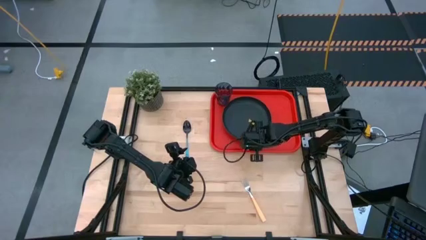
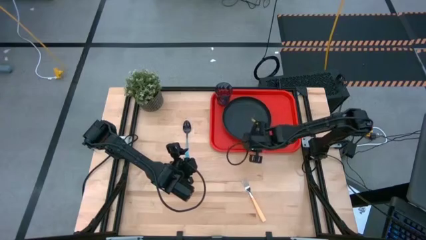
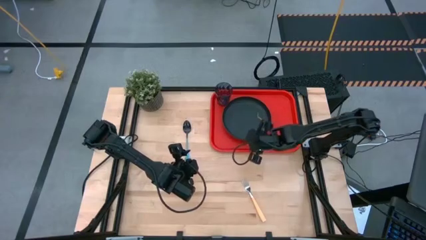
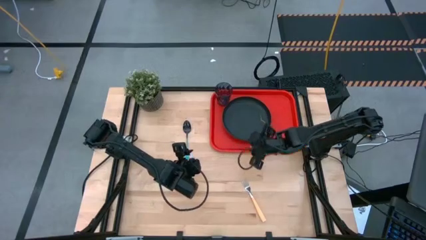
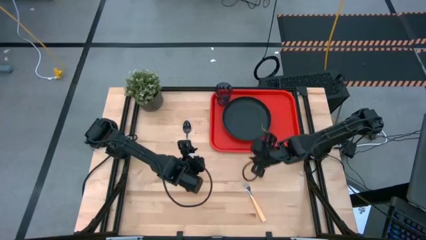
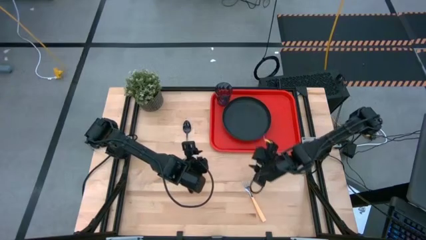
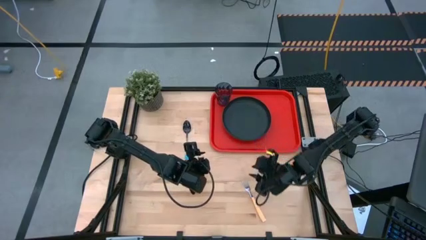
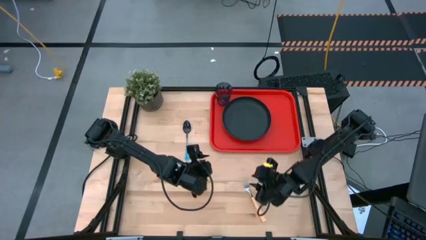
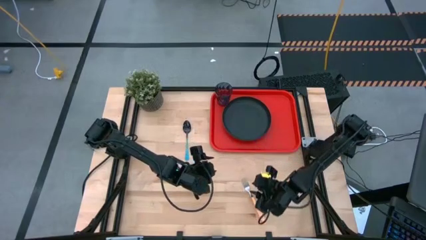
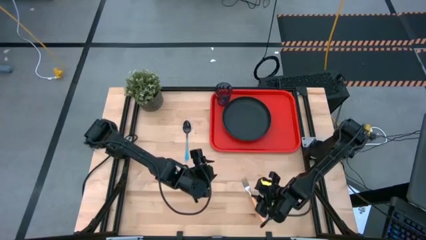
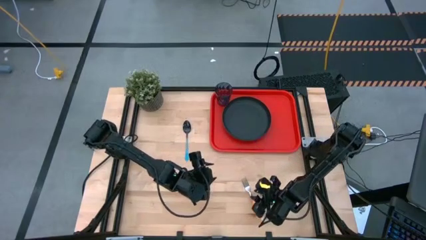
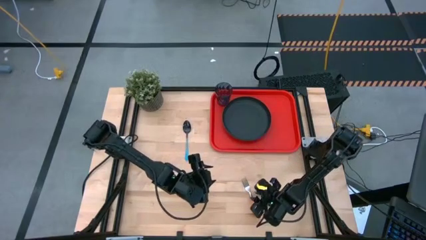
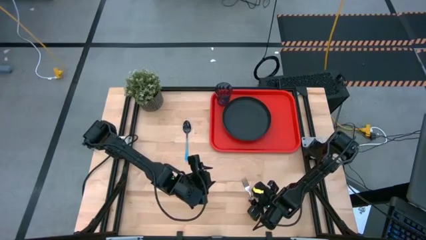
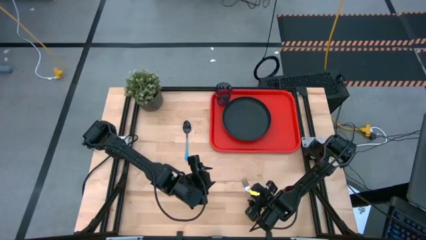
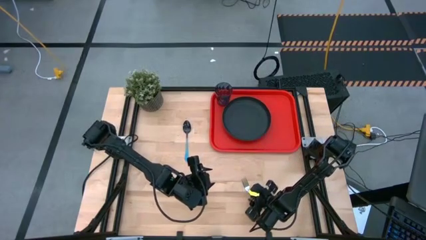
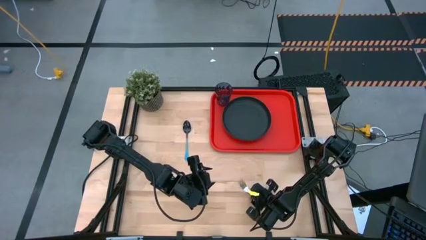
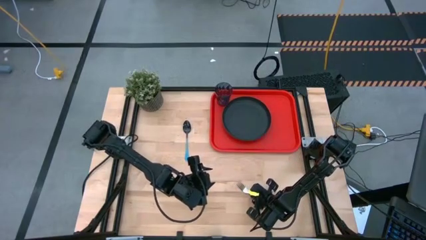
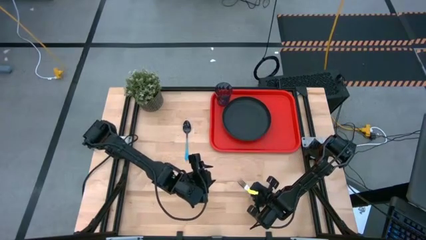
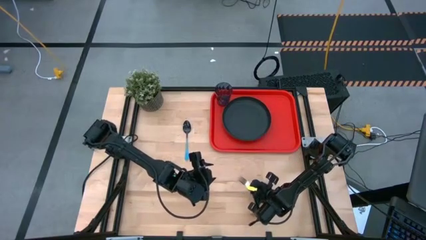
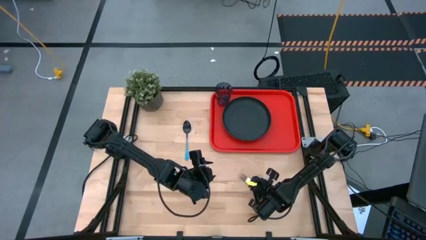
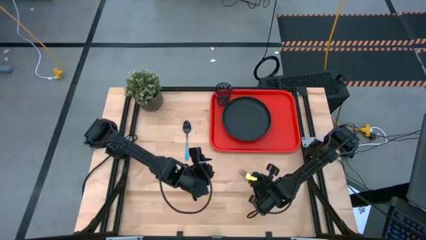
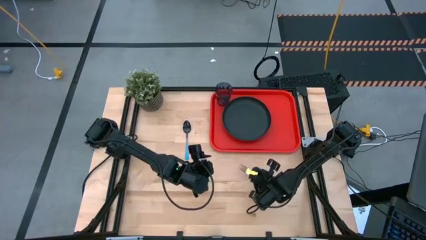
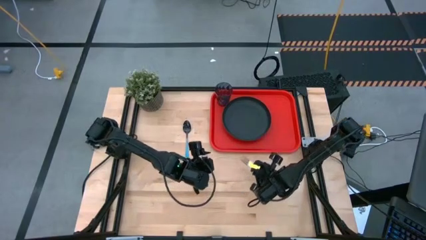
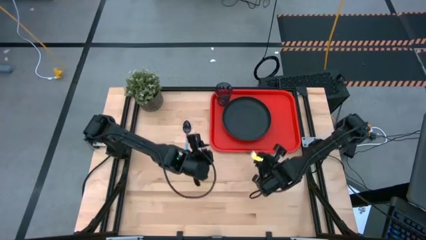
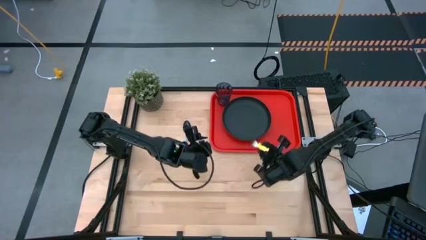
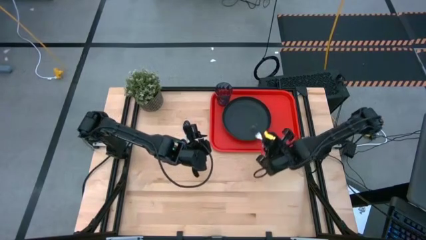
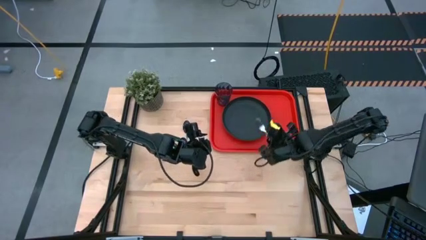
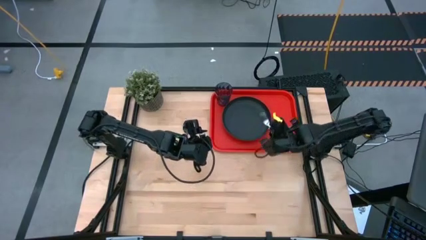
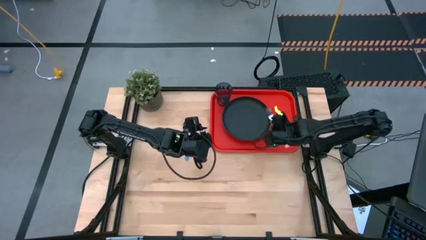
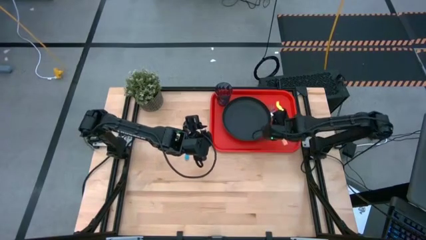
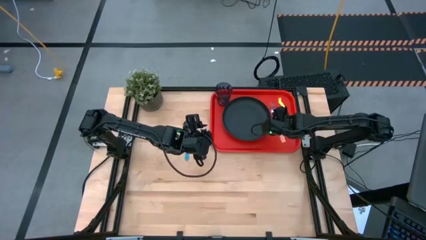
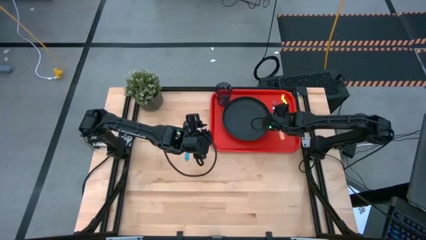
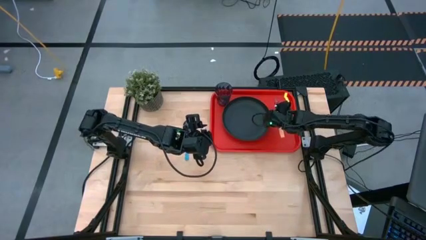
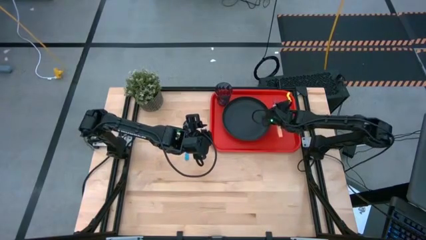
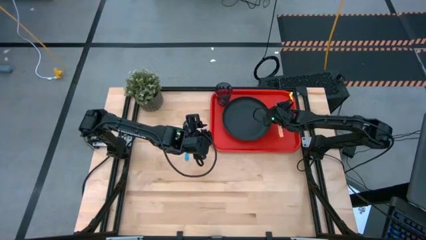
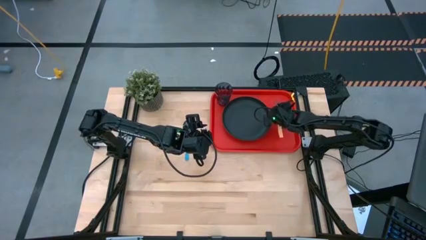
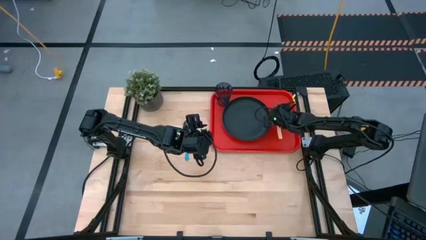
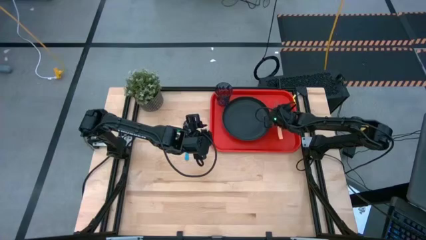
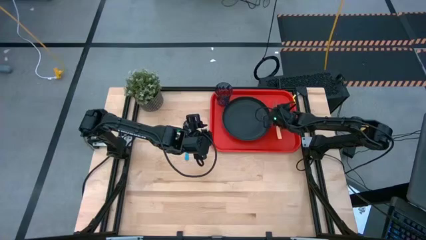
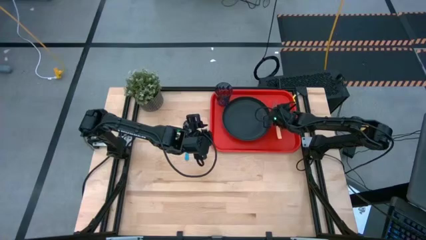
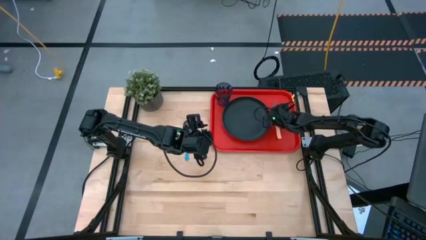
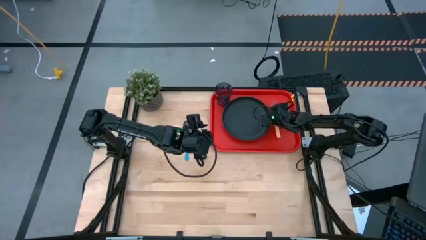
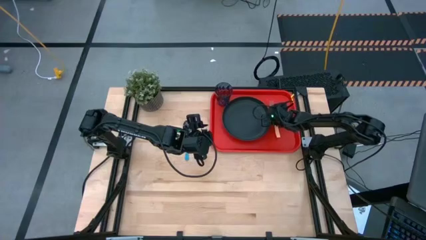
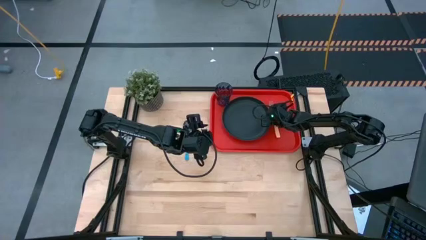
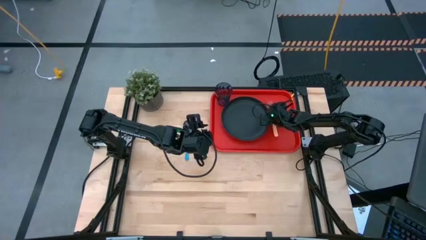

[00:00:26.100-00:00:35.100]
Task: Pick and place plate/cup/fork/spoon on tray
Put the yellow fork on the serving tray to he right of the black plate

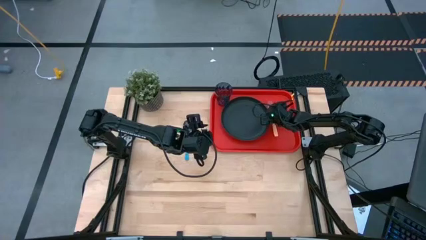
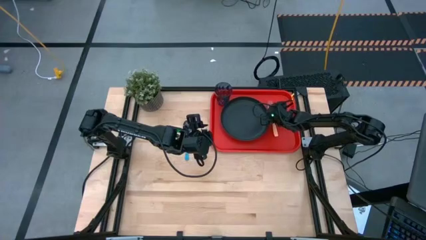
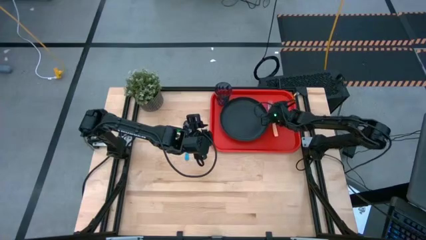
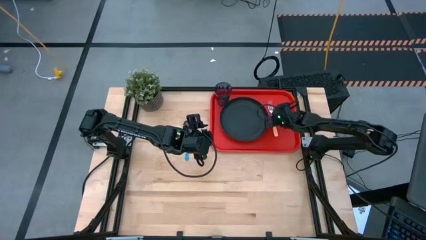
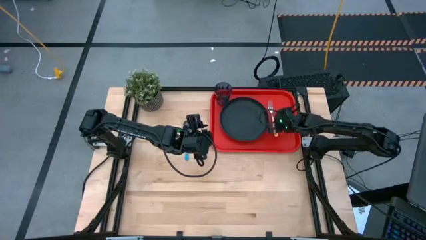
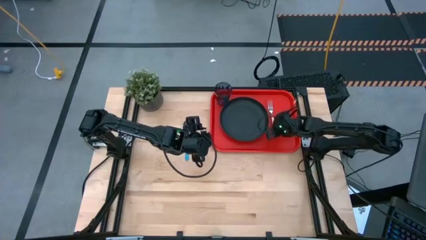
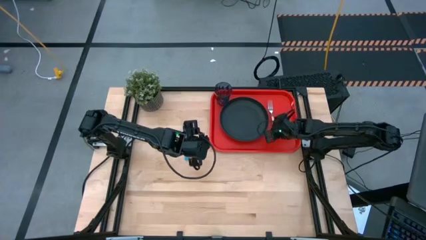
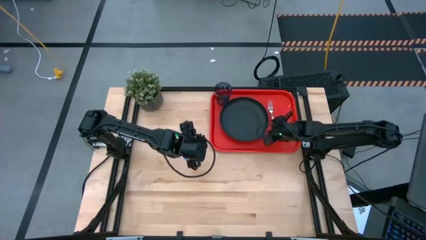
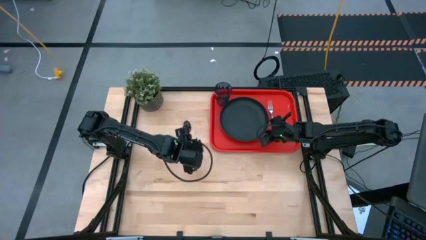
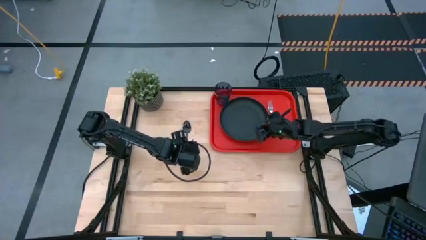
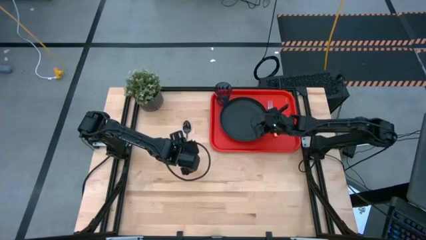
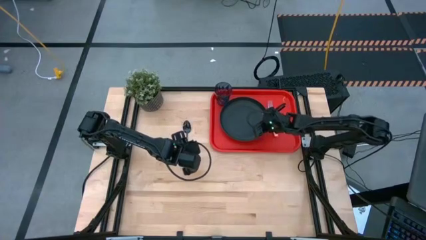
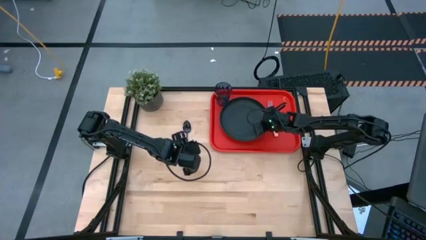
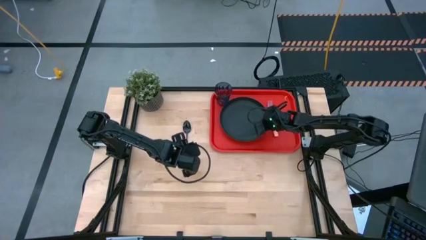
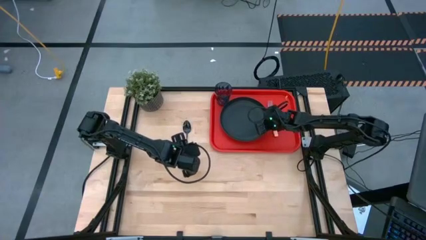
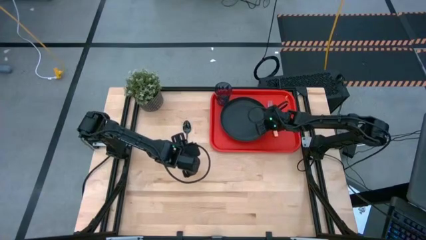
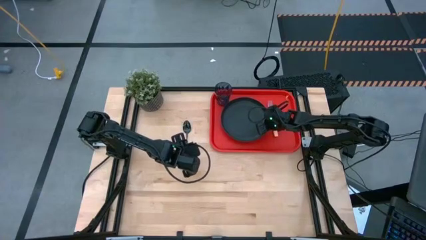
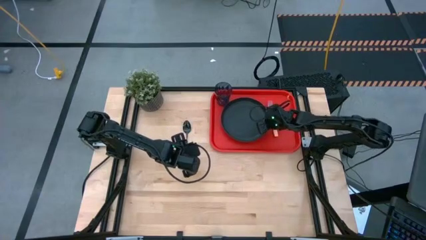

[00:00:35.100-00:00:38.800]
Adjust the black plate

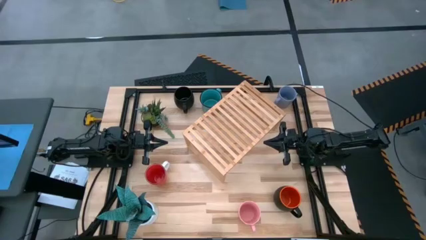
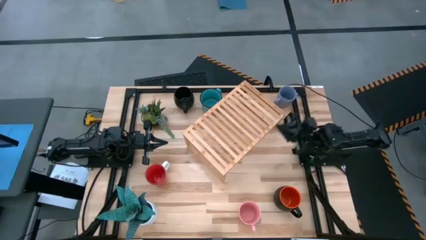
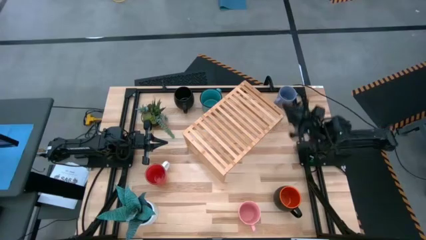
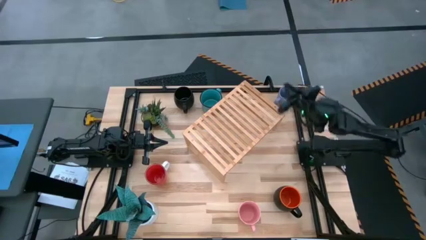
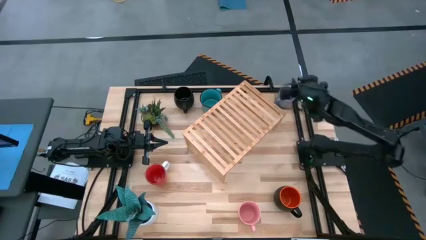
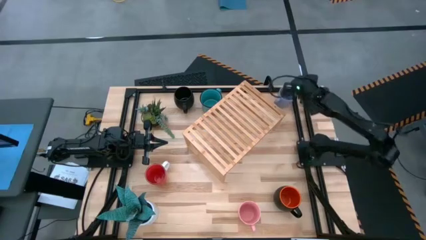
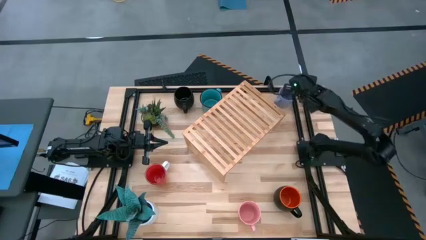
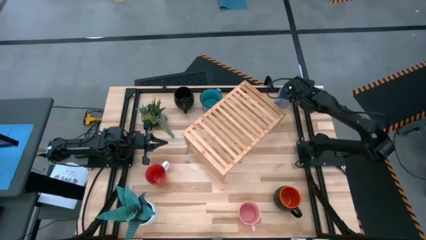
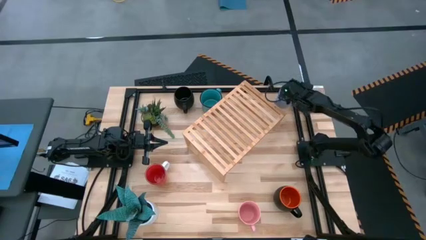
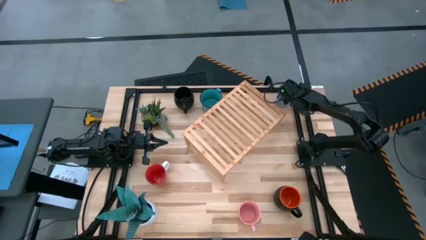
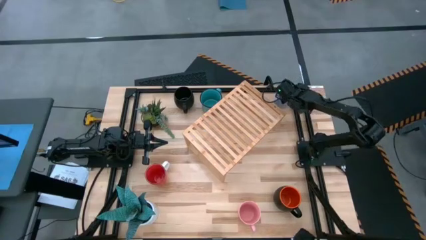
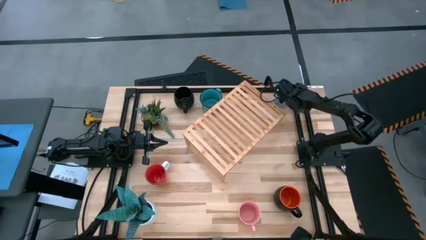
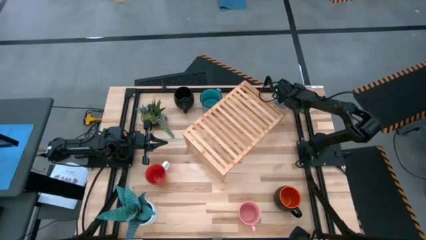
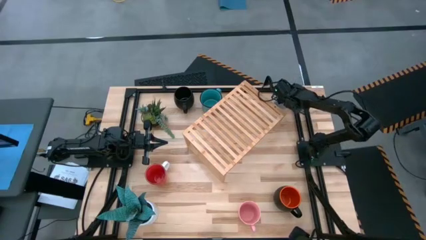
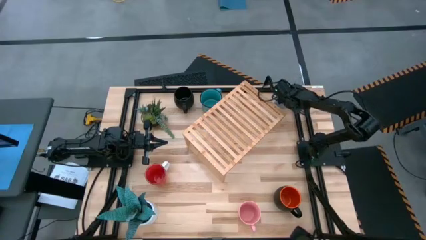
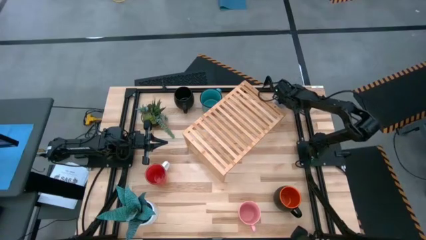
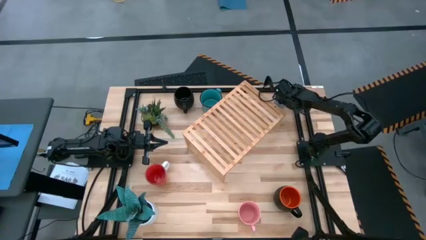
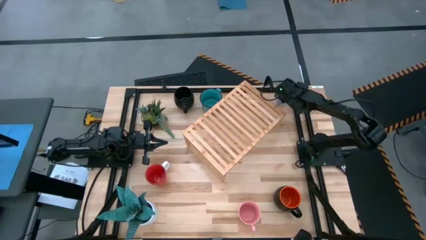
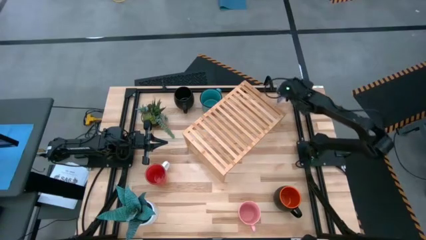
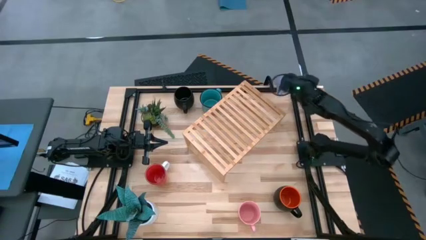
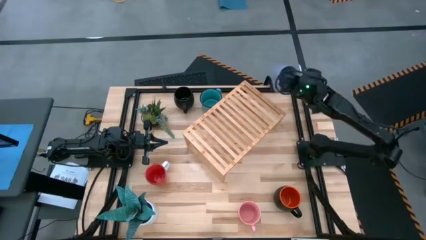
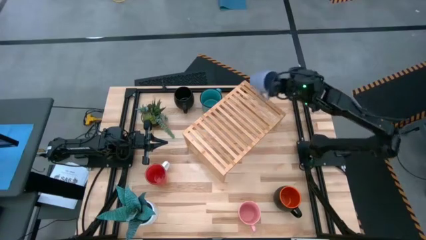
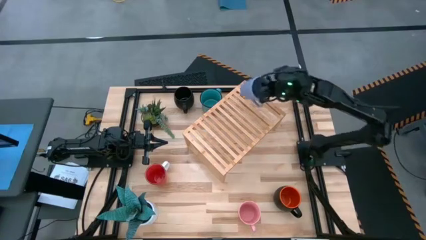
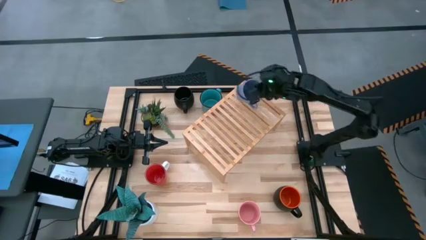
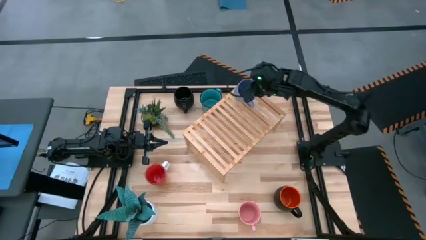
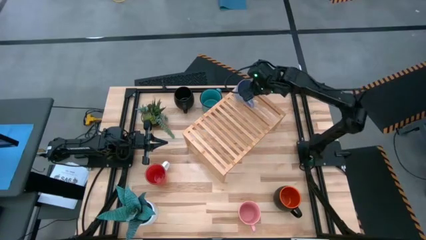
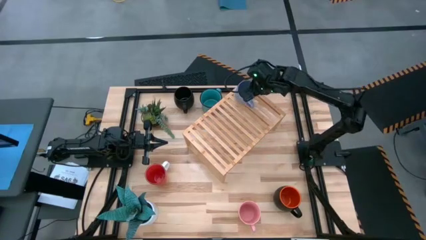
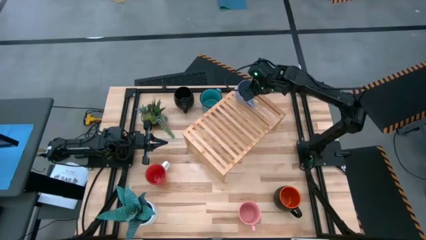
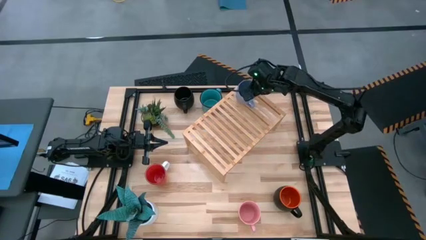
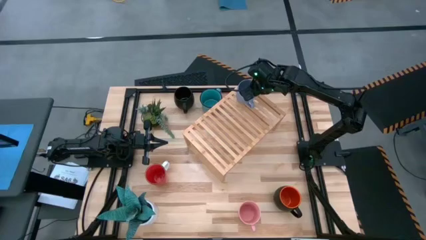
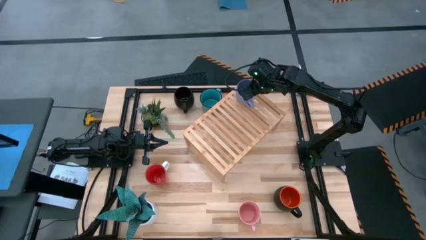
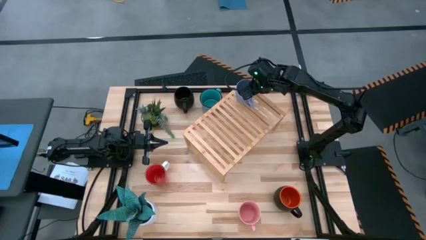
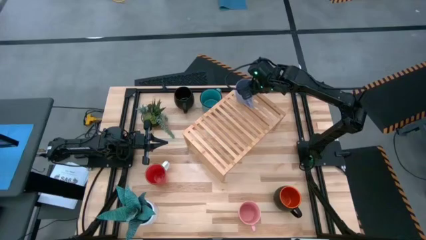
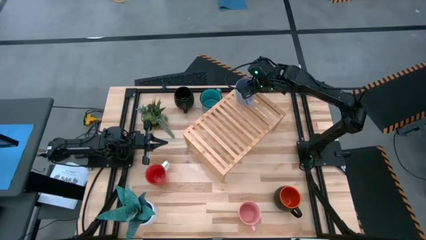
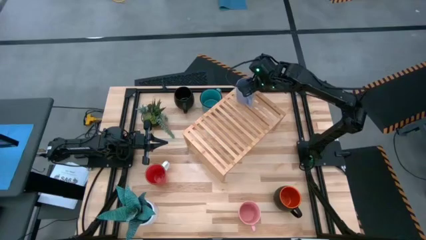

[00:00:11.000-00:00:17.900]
Task: Place coffee mugs
Put the violet mug on the shelf
